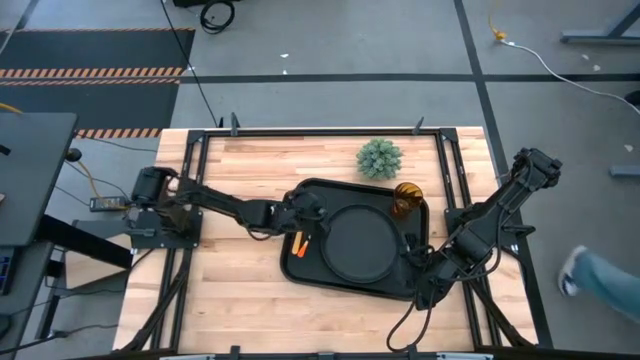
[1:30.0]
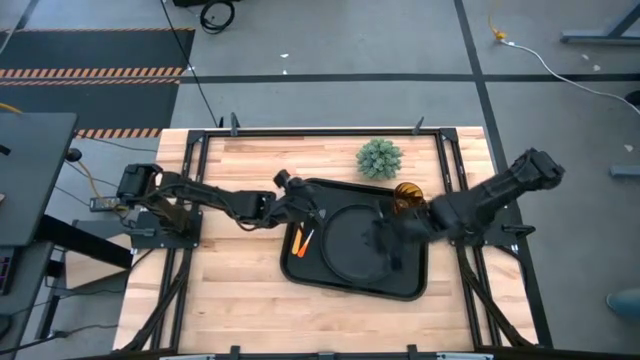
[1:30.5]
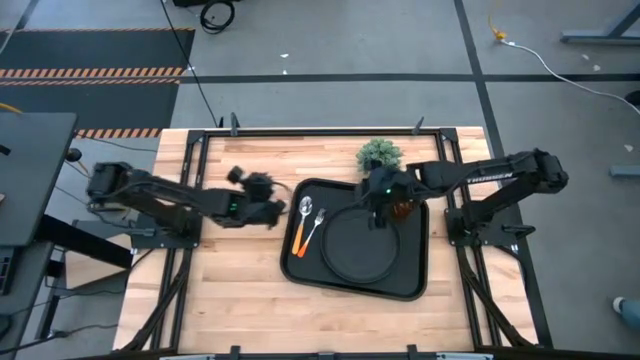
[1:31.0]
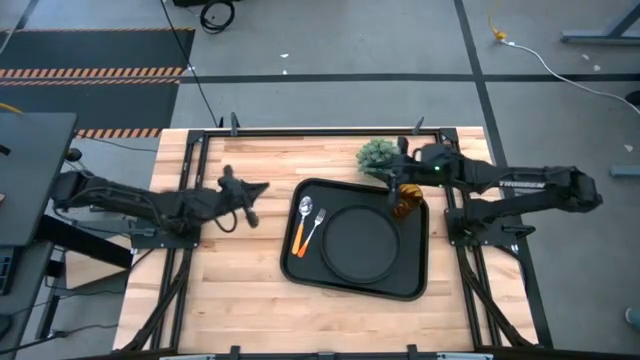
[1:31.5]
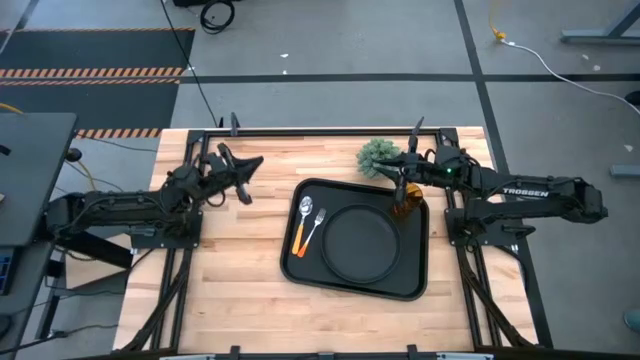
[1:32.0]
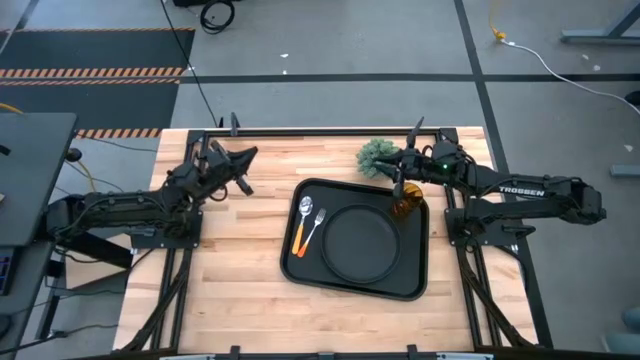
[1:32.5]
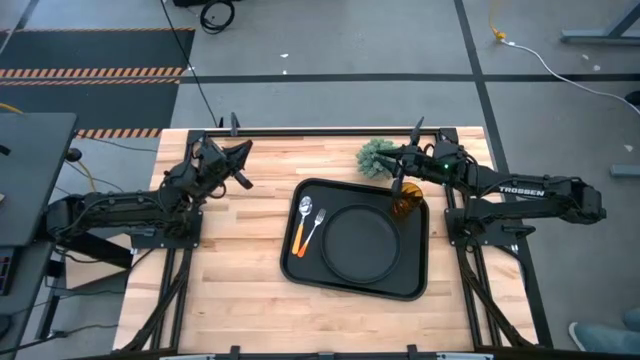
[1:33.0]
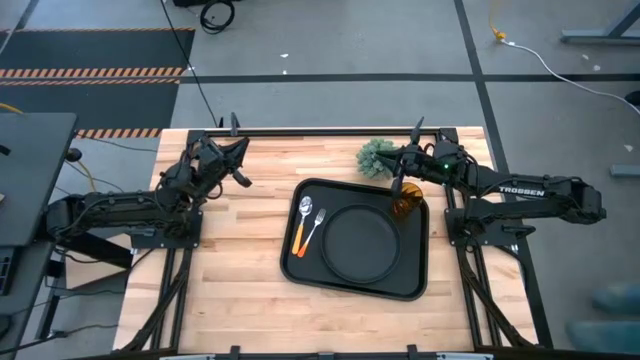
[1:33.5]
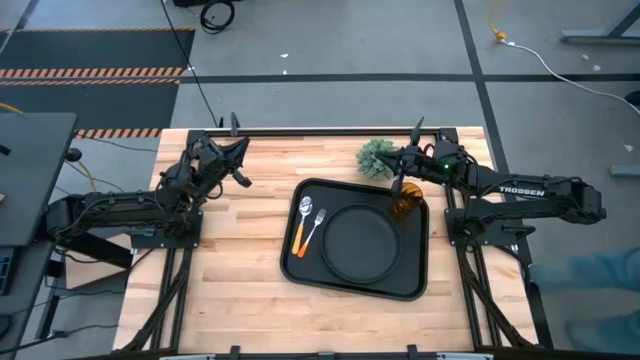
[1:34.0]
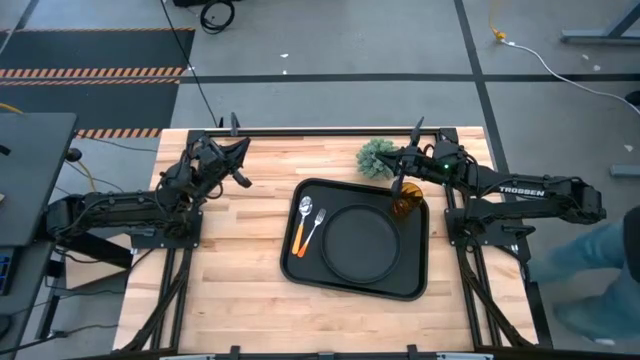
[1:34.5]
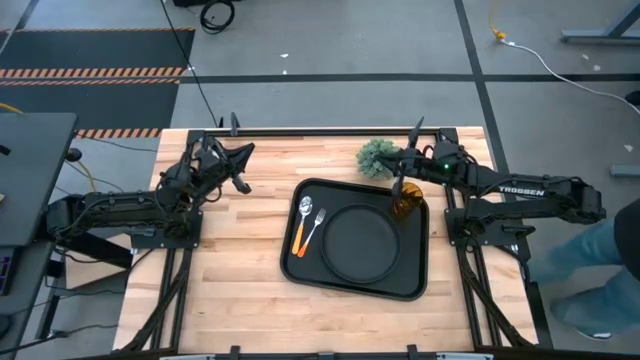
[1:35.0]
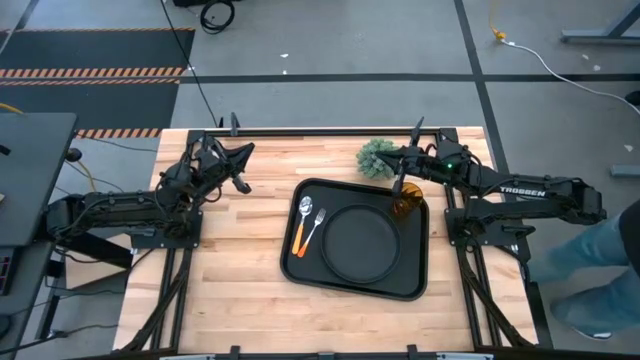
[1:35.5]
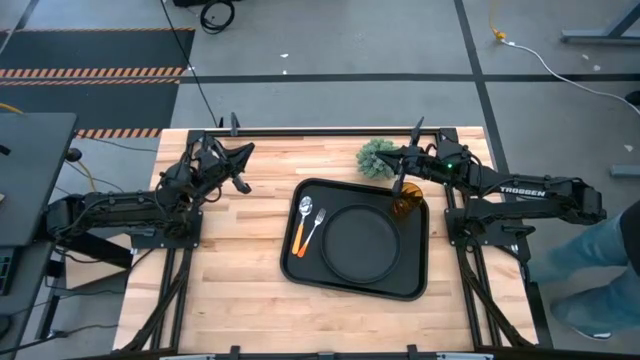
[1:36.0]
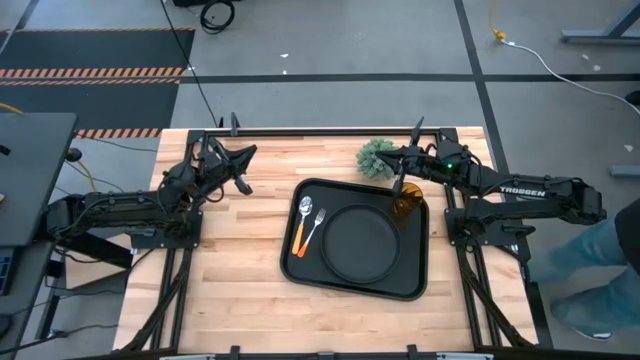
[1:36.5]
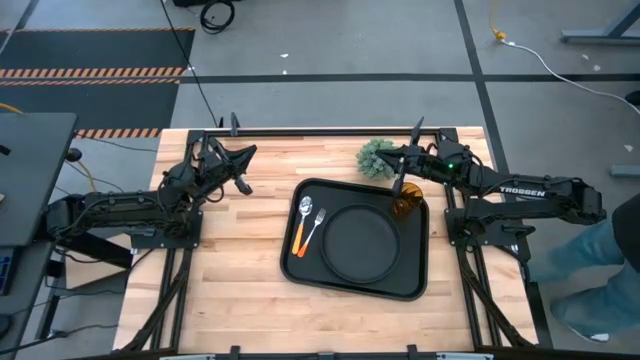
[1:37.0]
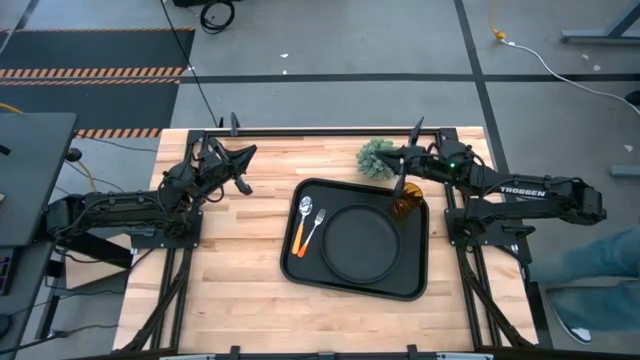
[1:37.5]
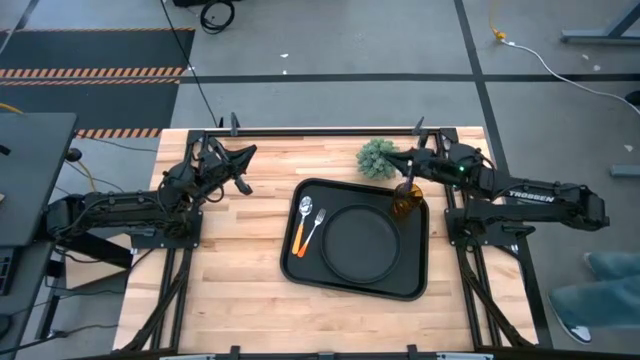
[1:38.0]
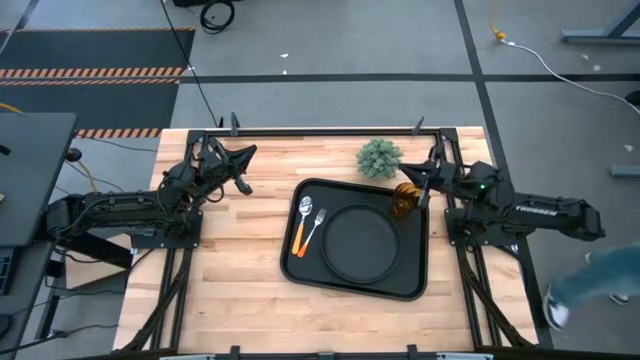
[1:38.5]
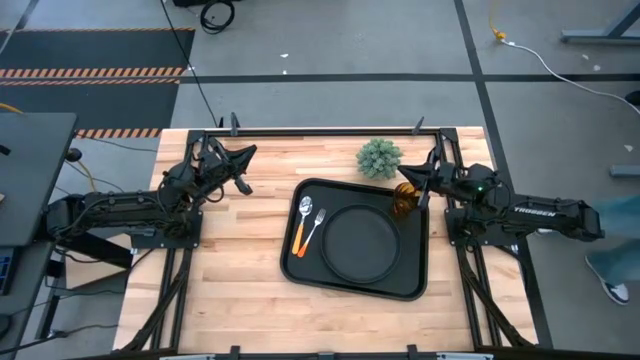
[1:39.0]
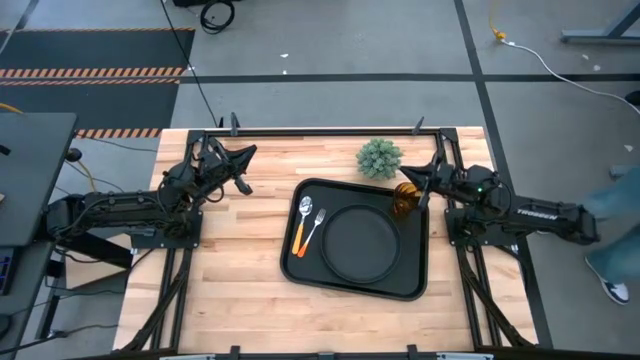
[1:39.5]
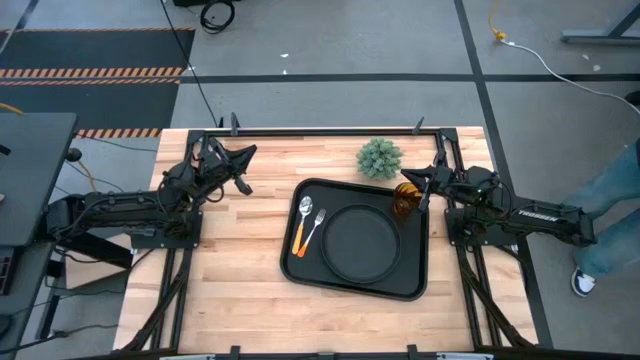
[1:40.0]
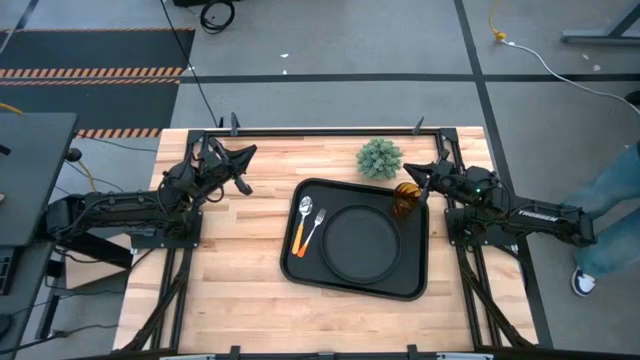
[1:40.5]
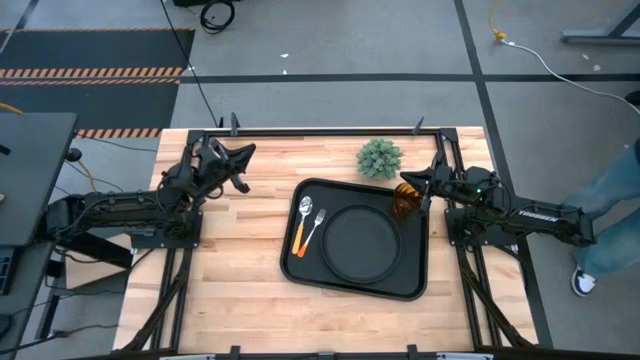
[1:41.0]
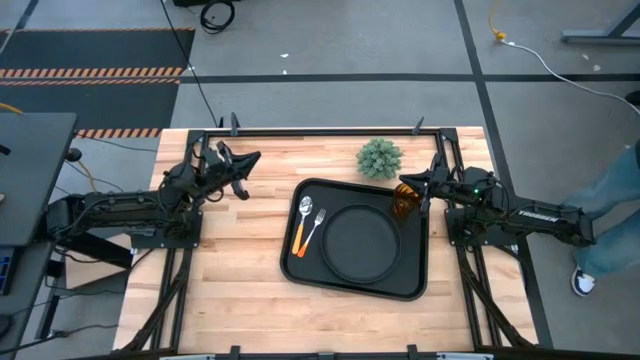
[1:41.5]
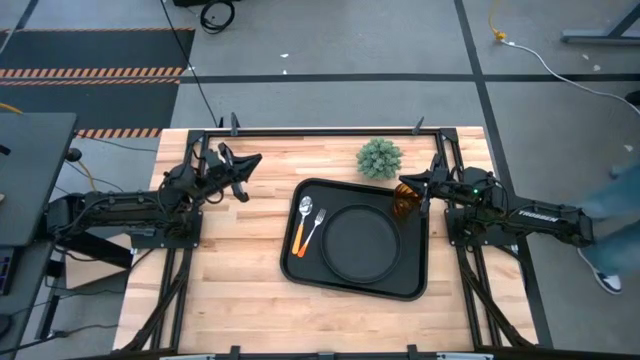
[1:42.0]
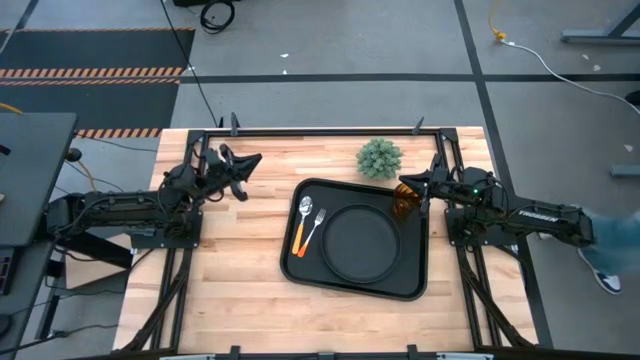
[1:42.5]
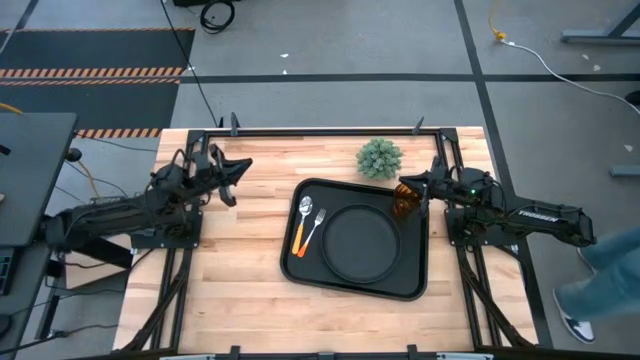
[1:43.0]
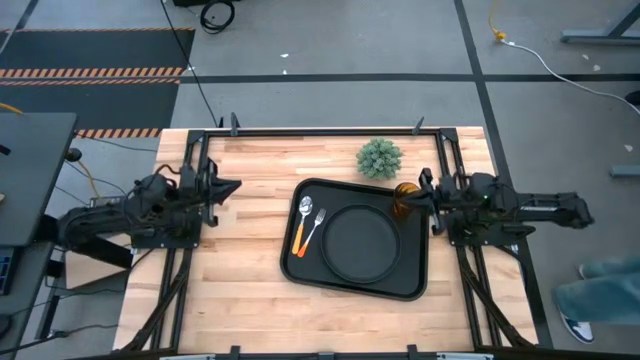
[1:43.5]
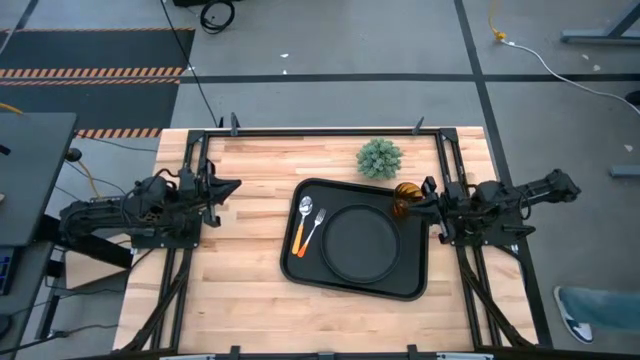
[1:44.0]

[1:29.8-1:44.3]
Task: Pick and place plate/cup/fork/spoon on tray
Return to Home Position

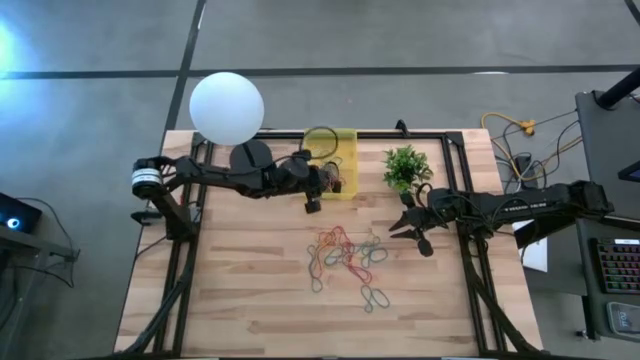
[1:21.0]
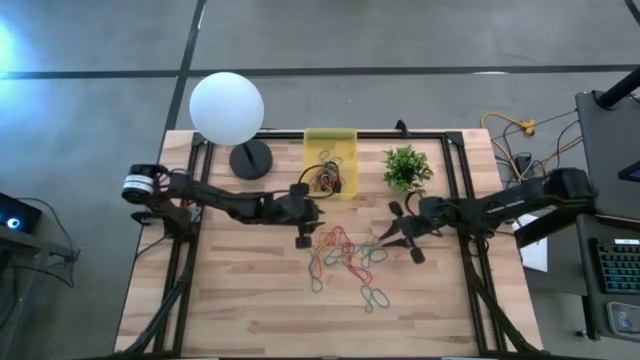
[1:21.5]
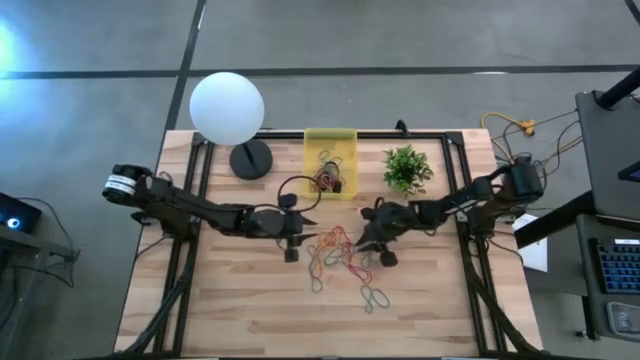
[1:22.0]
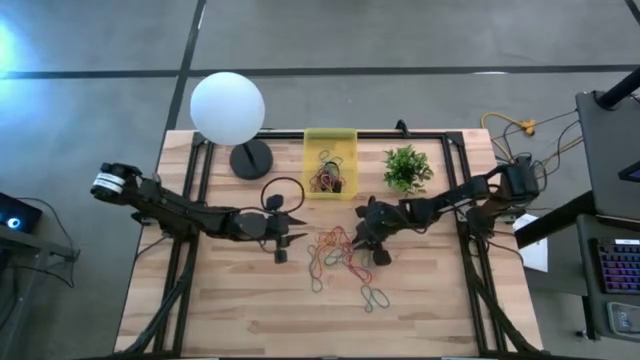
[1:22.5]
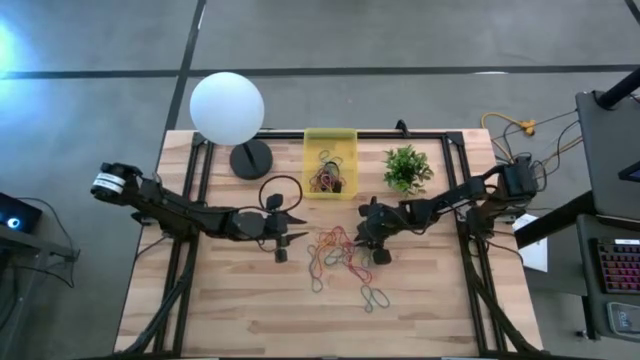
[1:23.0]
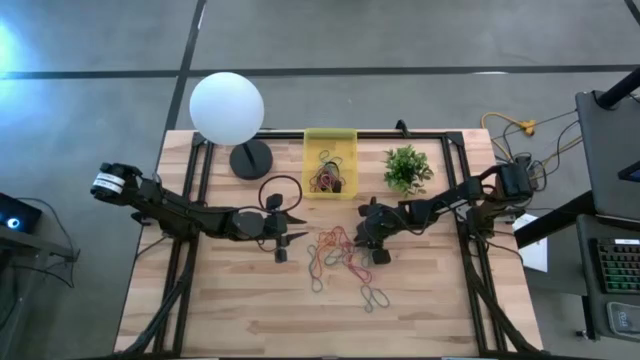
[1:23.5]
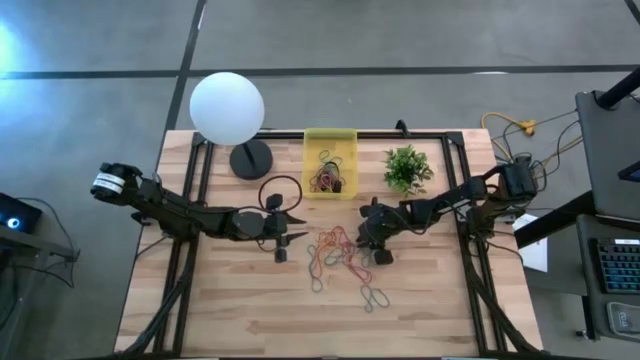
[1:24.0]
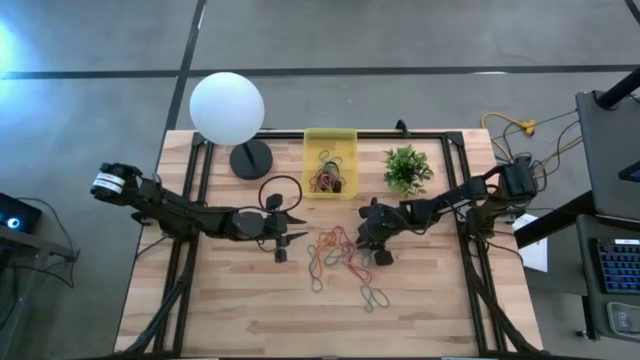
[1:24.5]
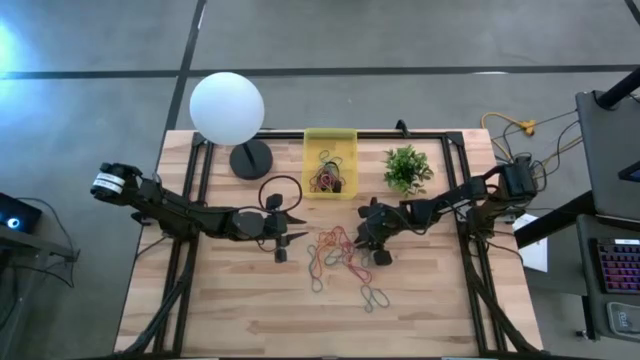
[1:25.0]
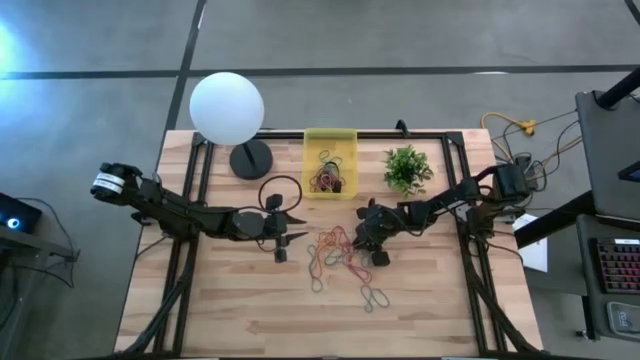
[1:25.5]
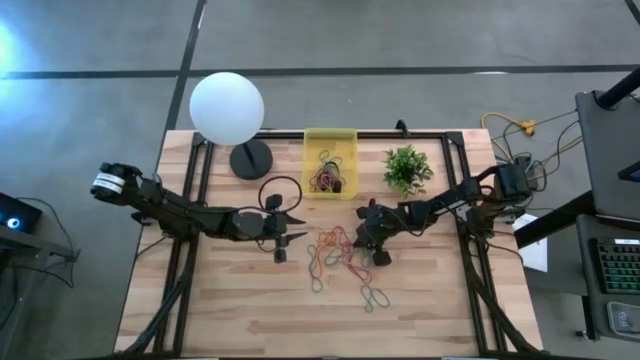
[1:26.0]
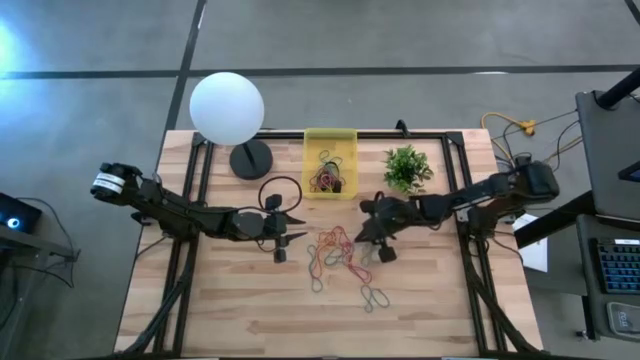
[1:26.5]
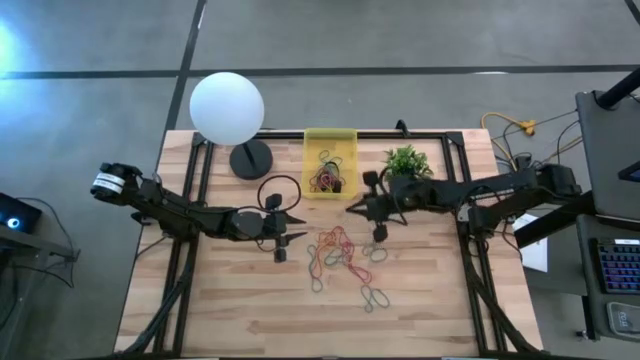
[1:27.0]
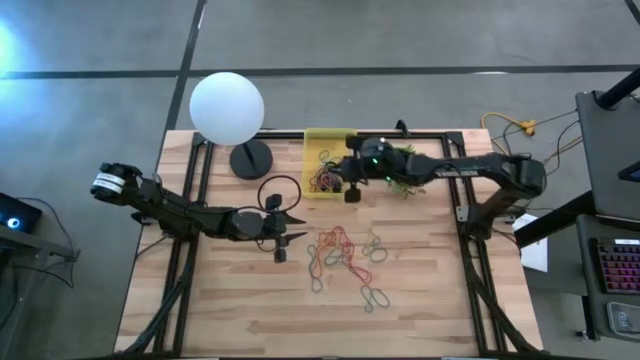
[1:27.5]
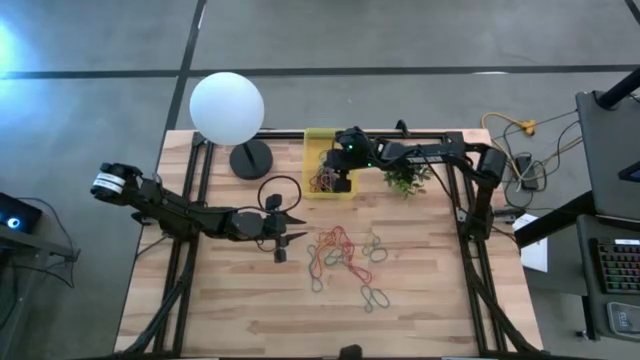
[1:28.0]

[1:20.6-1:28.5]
Task: Pick and place rubber bands into bin
Put the blue rubber band into the yellow bin
